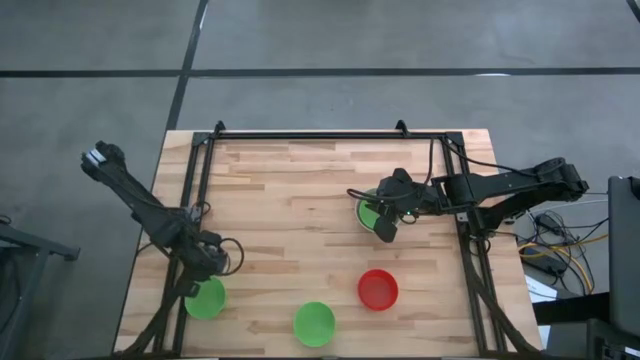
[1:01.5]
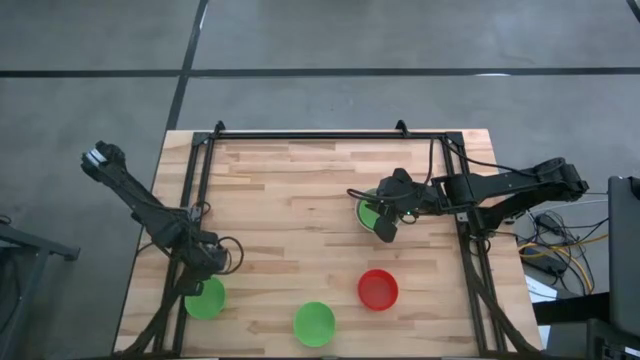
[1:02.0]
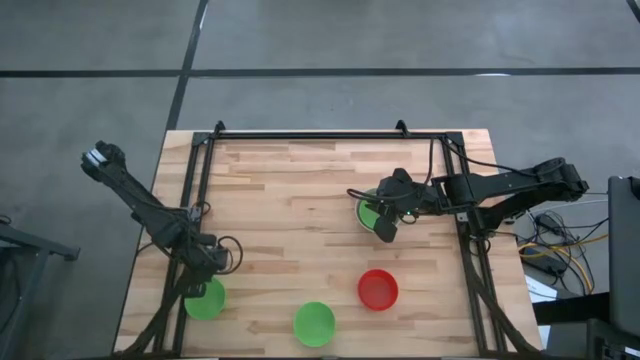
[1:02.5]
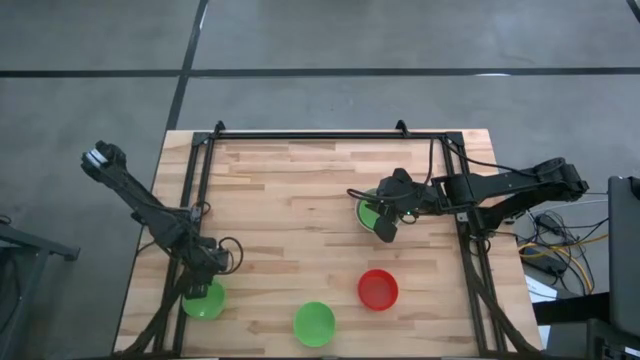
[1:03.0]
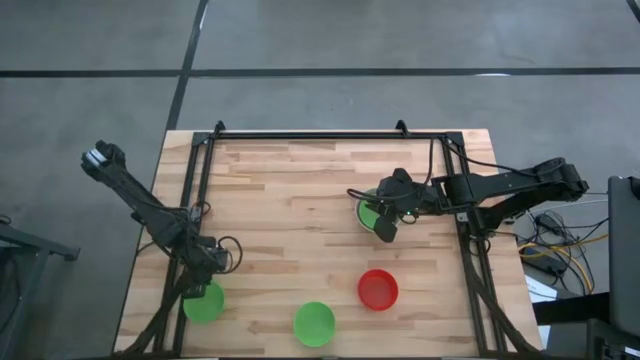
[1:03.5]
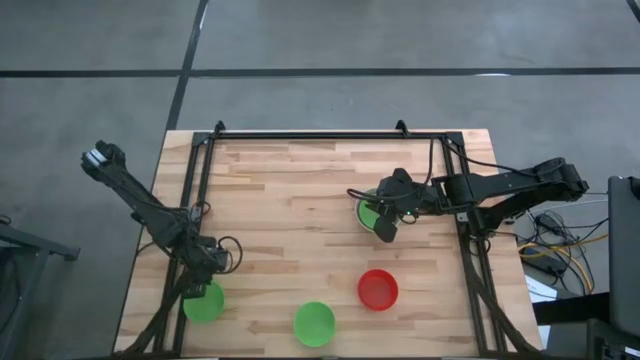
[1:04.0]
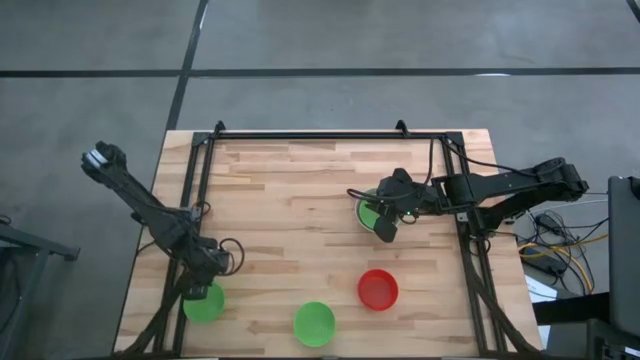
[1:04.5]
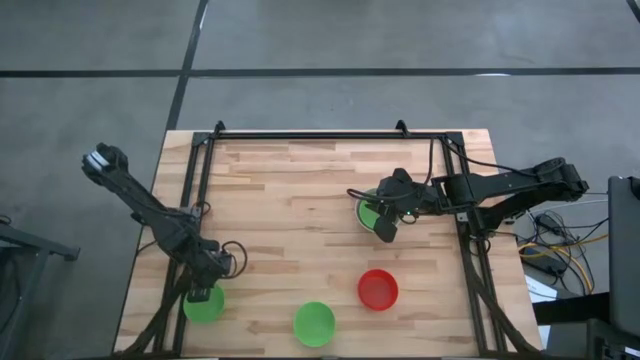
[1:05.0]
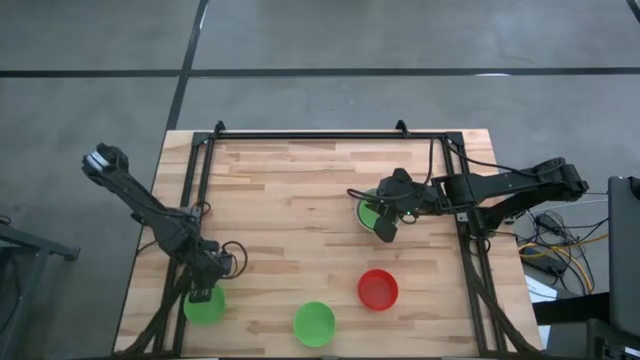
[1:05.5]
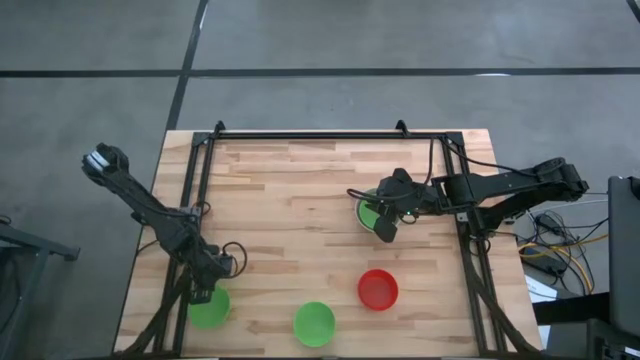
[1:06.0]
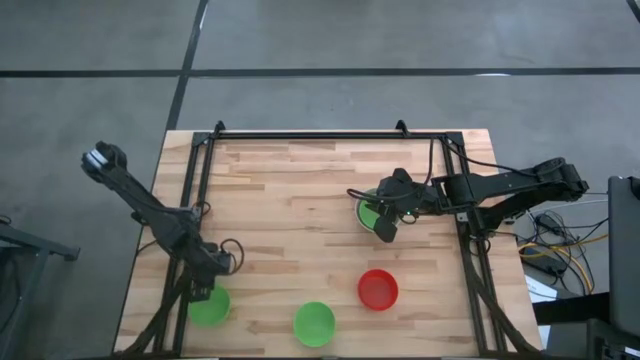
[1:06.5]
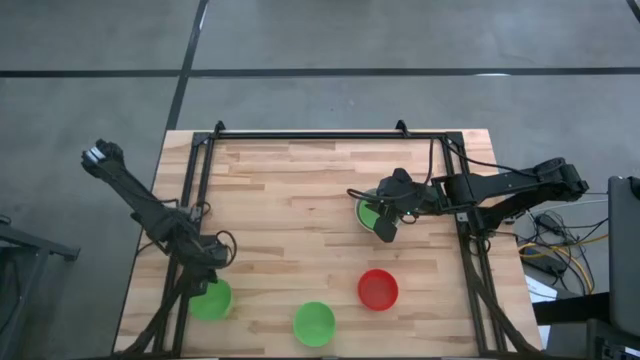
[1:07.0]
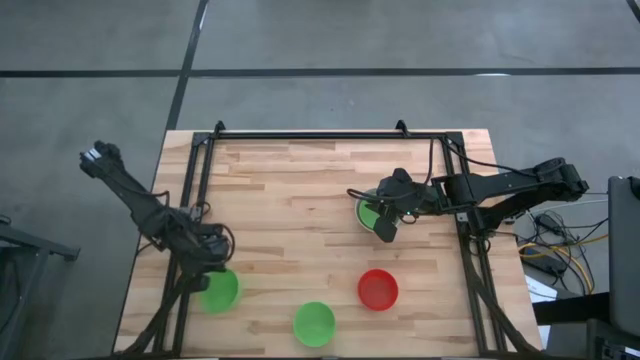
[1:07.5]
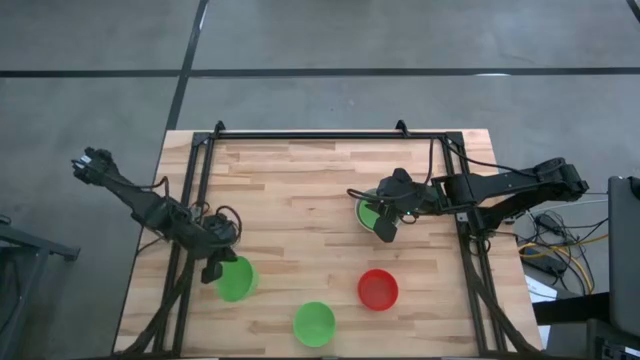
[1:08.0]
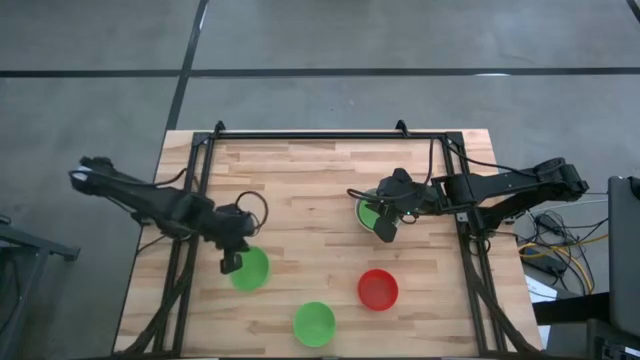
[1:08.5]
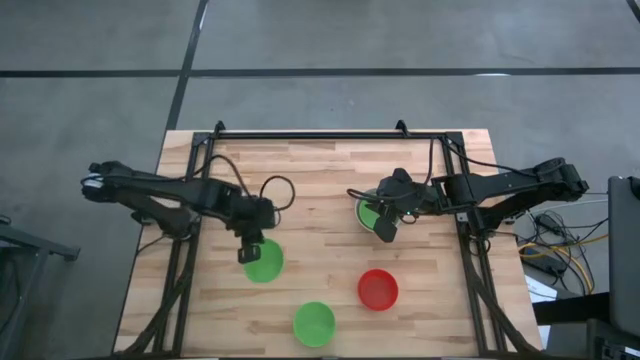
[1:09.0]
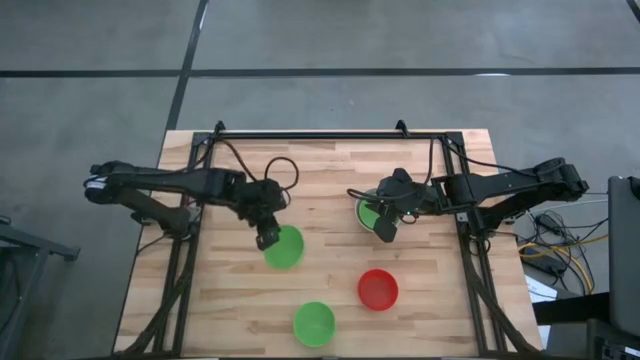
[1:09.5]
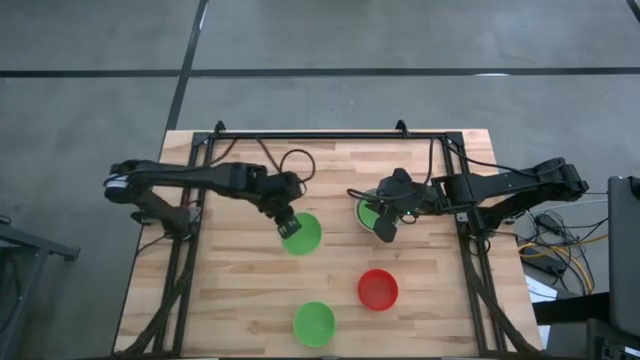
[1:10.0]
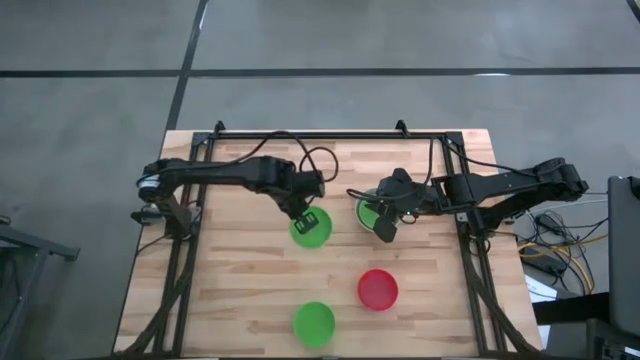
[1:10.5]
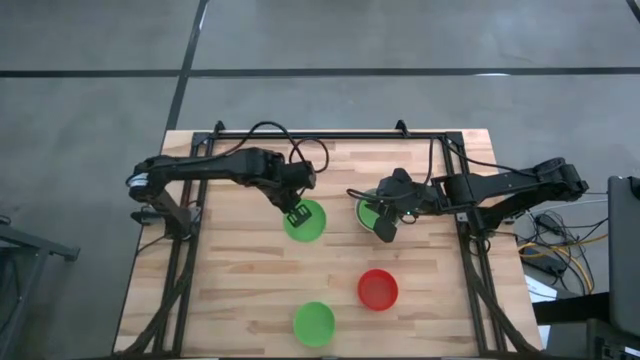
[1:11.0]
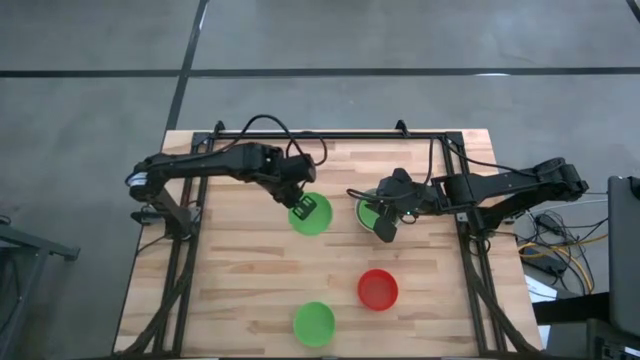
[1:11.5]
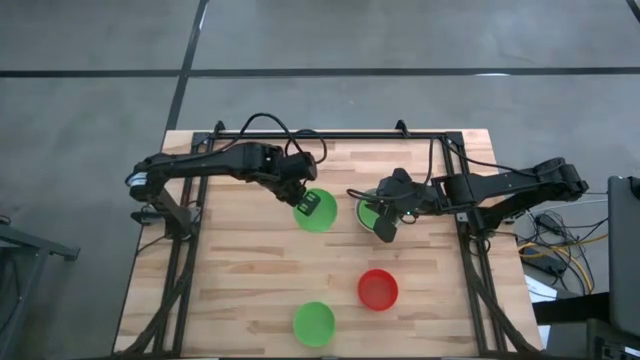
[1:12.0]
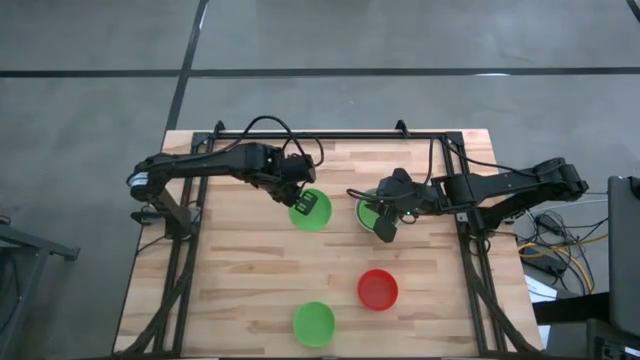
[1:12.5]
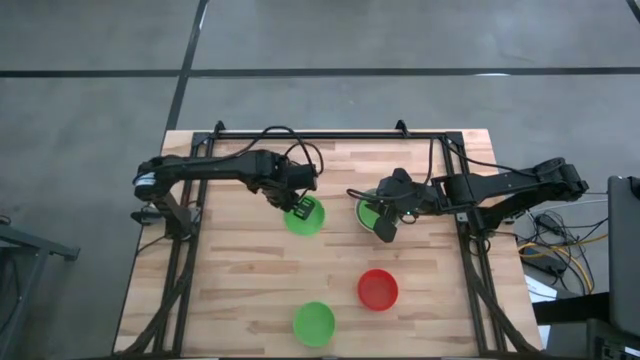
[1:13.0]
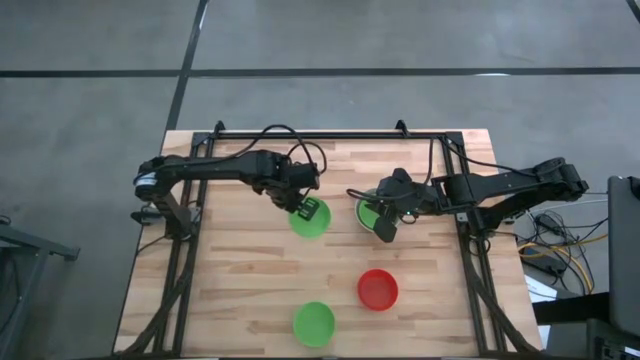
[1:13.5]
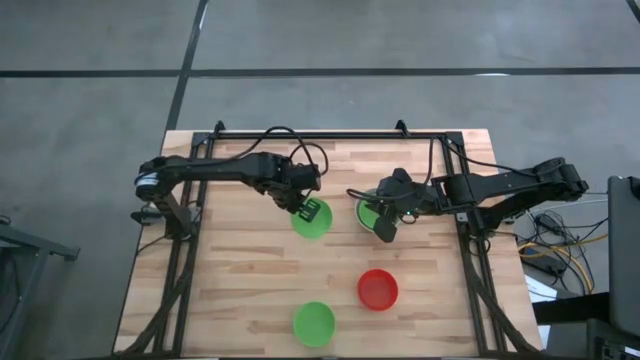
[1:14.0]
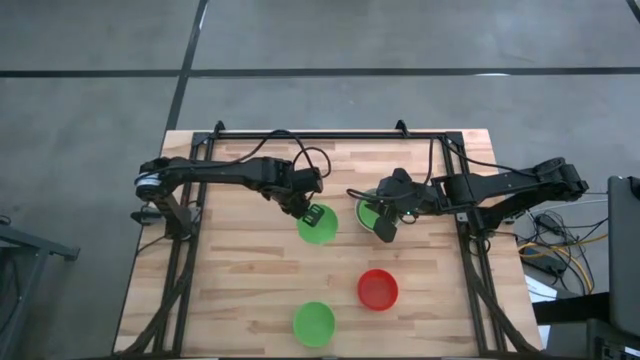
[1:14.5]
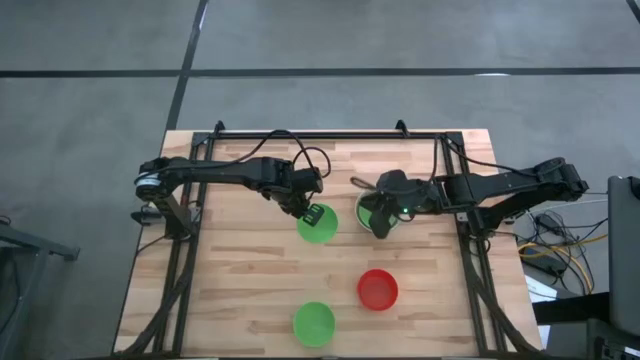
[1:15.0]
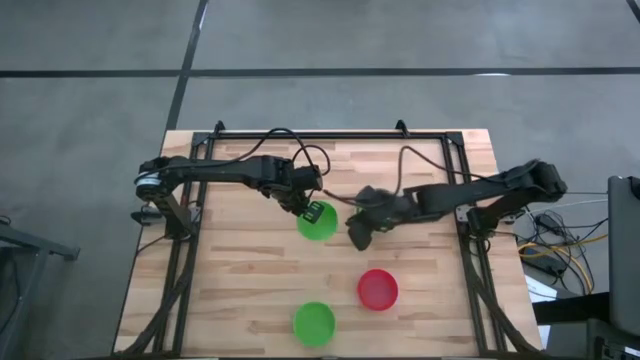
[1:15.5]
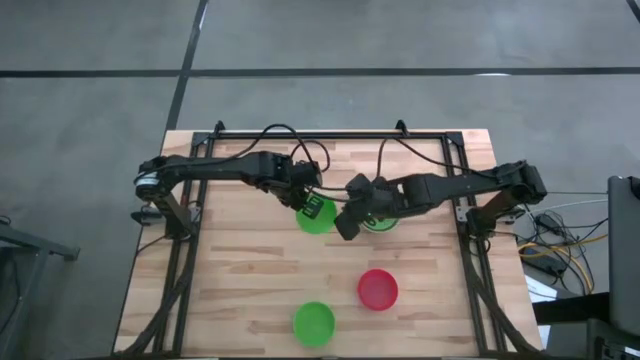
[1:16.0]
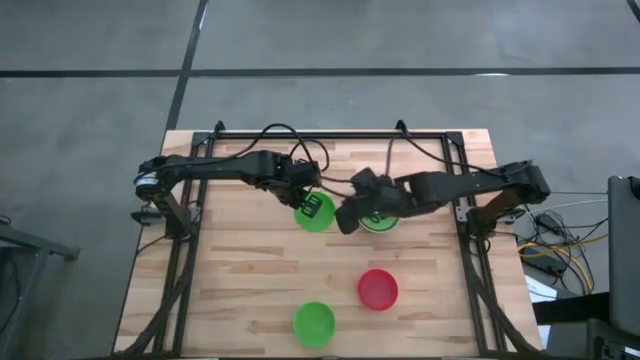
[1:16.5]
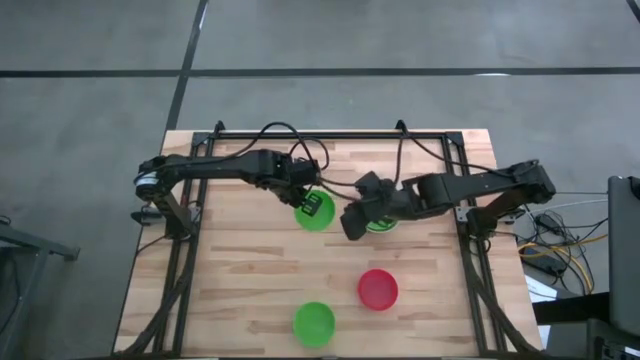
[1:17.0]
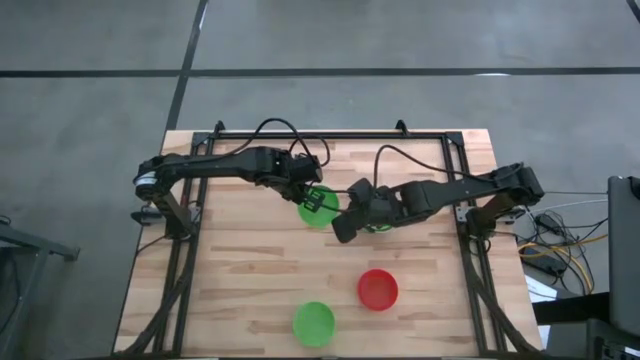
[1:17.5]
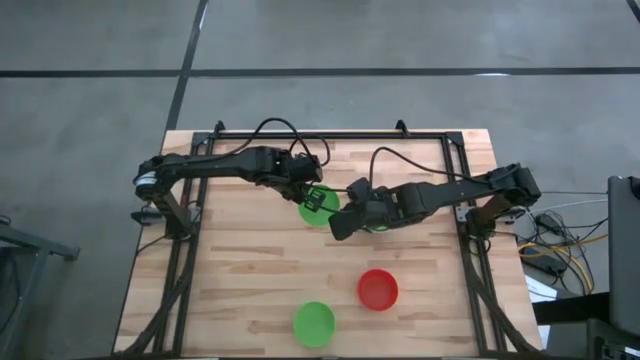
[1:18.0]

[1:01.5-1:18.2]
Stack the left green bowl on the green bowl
